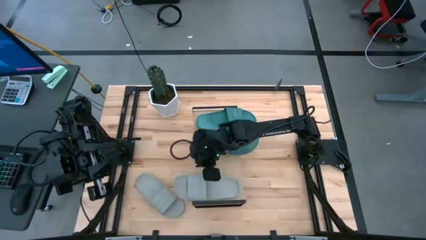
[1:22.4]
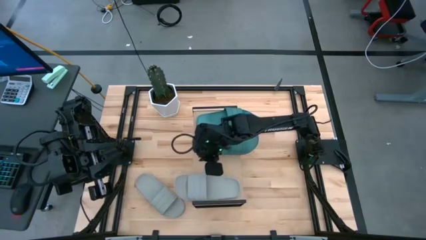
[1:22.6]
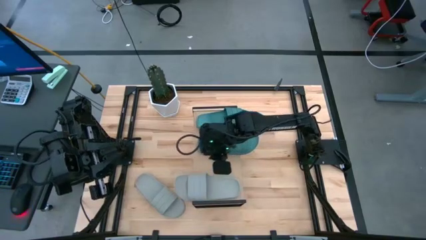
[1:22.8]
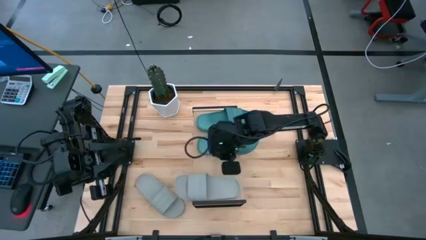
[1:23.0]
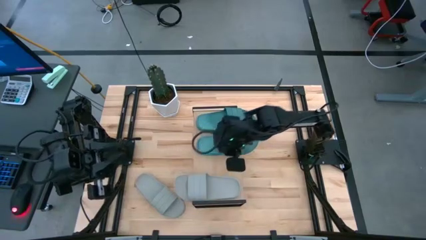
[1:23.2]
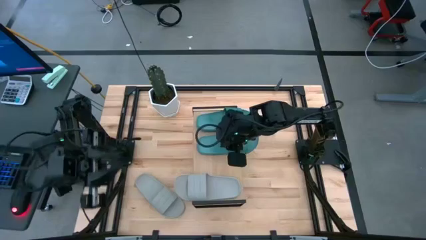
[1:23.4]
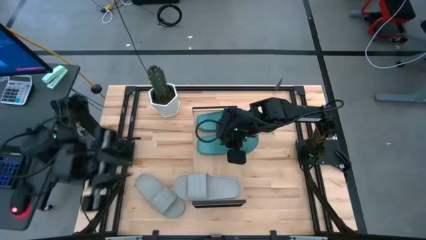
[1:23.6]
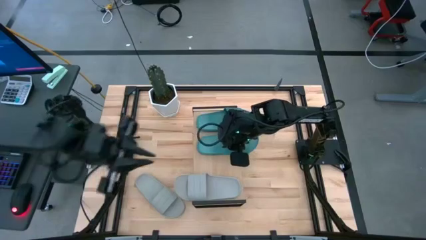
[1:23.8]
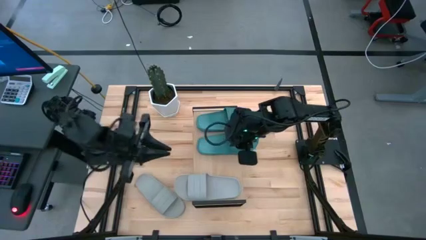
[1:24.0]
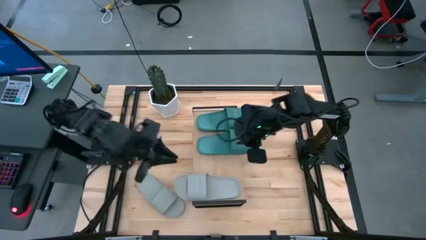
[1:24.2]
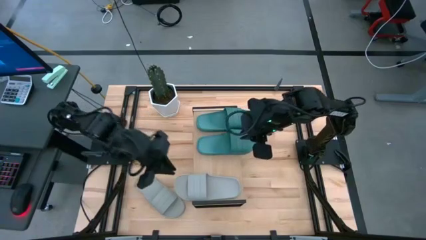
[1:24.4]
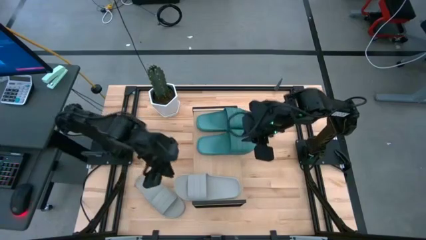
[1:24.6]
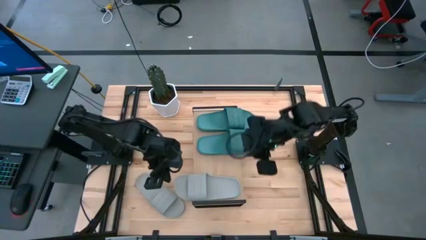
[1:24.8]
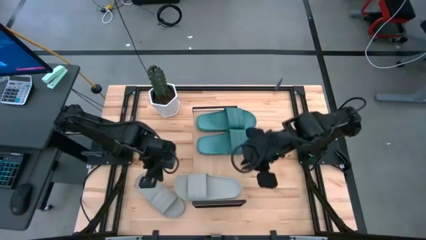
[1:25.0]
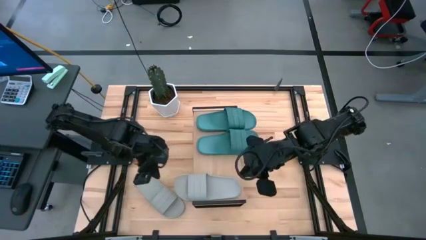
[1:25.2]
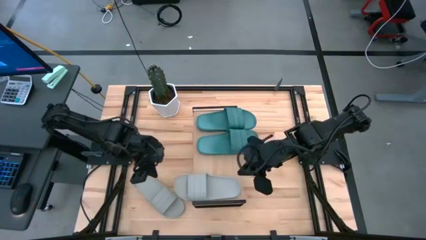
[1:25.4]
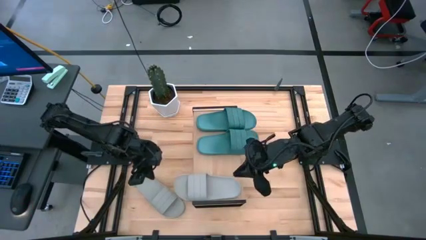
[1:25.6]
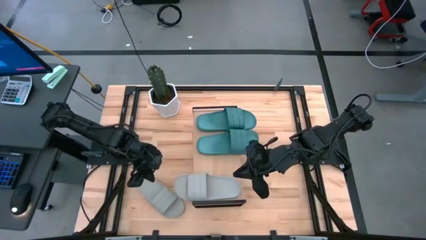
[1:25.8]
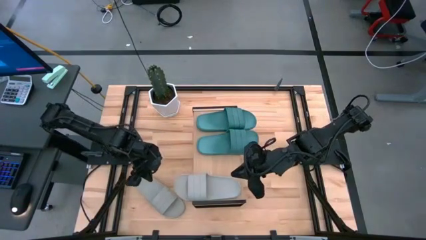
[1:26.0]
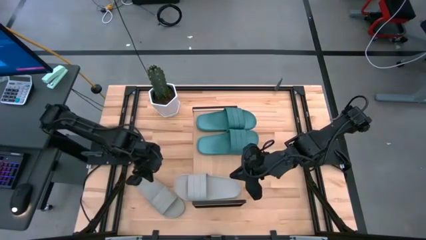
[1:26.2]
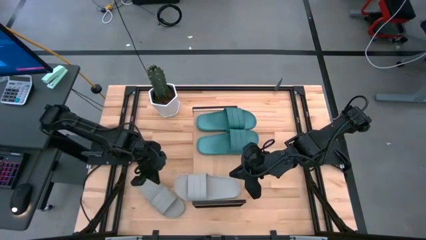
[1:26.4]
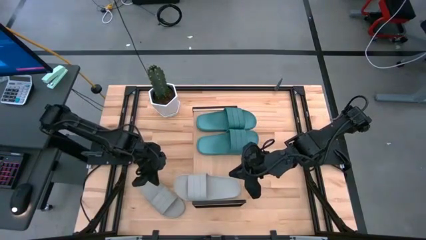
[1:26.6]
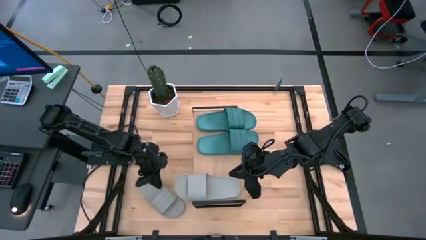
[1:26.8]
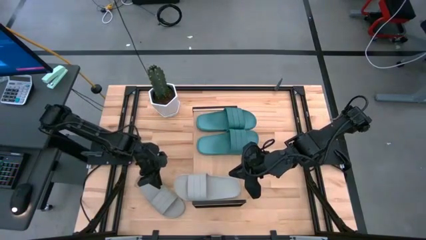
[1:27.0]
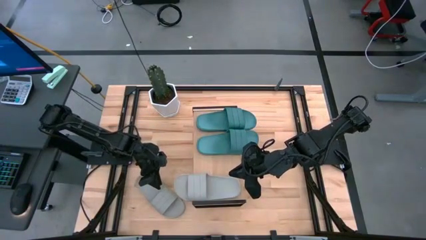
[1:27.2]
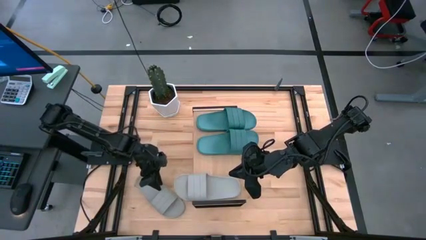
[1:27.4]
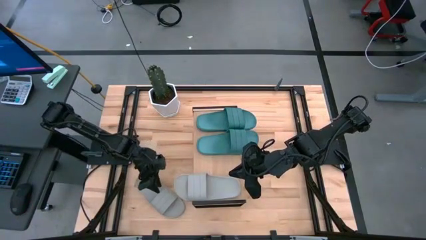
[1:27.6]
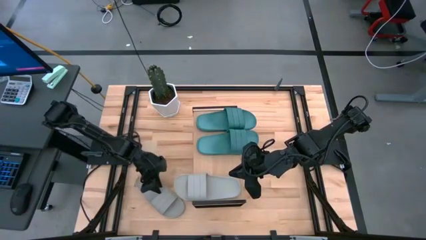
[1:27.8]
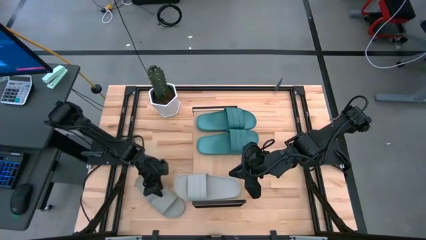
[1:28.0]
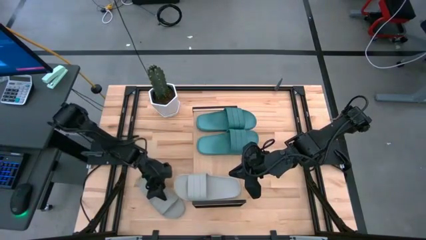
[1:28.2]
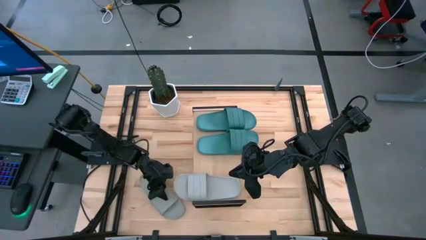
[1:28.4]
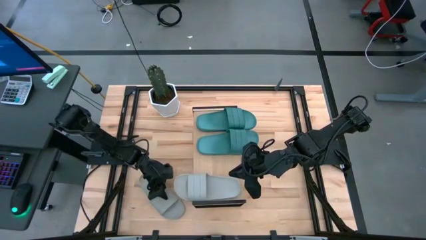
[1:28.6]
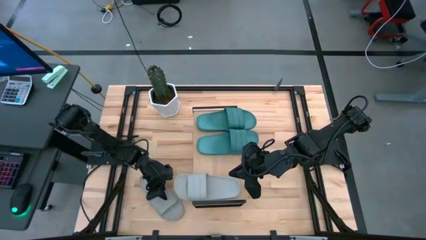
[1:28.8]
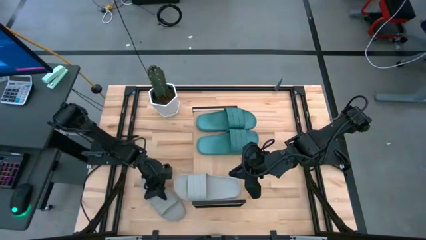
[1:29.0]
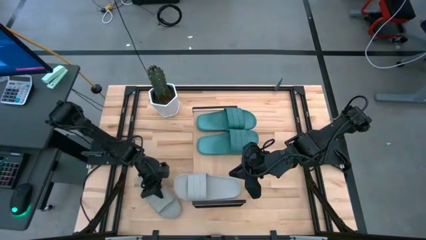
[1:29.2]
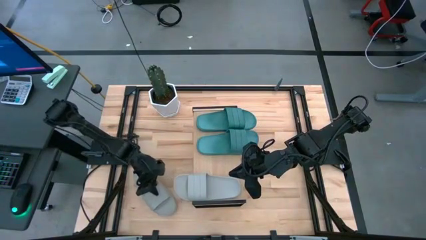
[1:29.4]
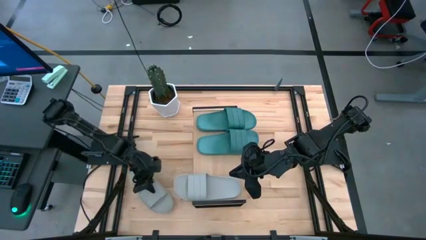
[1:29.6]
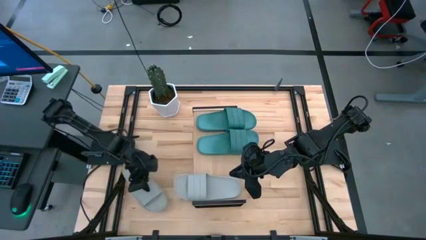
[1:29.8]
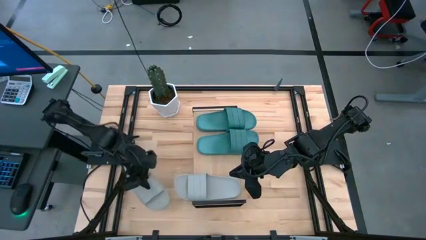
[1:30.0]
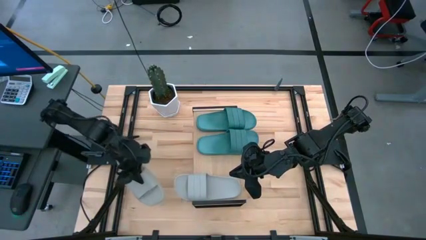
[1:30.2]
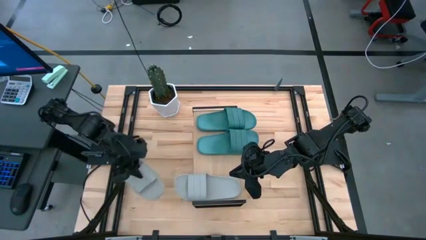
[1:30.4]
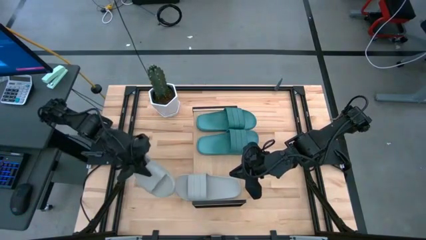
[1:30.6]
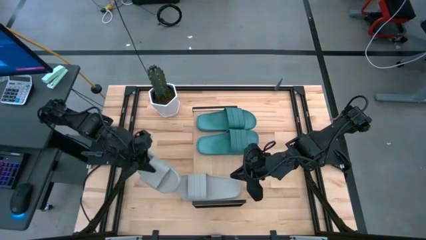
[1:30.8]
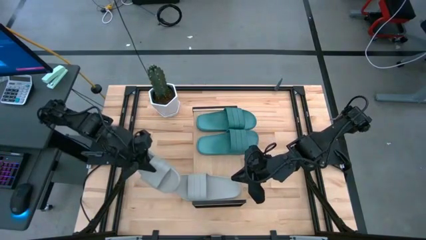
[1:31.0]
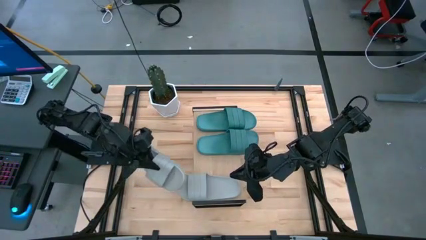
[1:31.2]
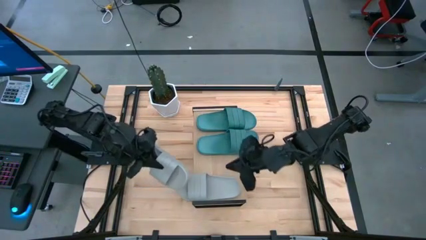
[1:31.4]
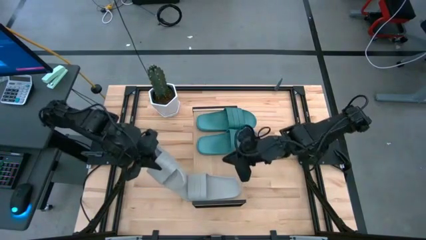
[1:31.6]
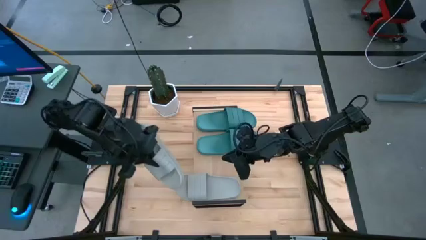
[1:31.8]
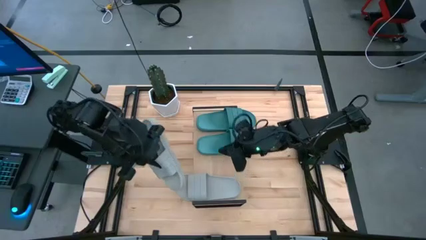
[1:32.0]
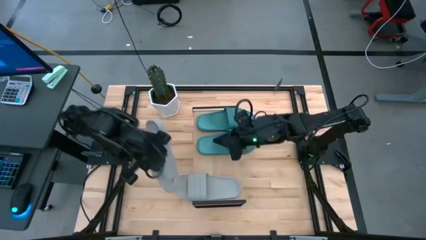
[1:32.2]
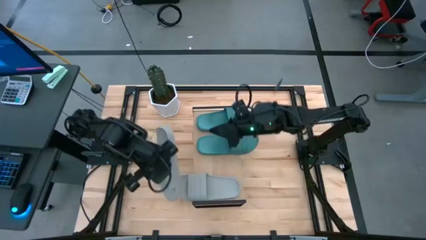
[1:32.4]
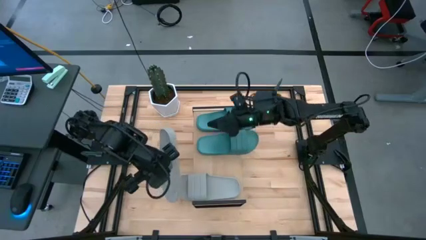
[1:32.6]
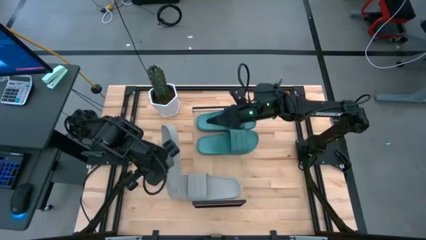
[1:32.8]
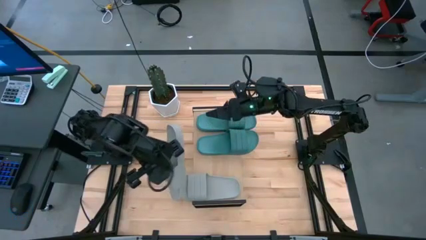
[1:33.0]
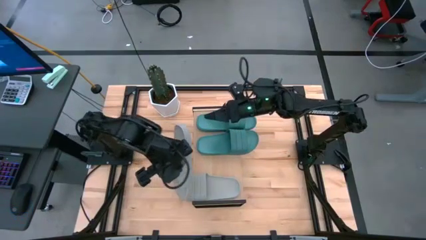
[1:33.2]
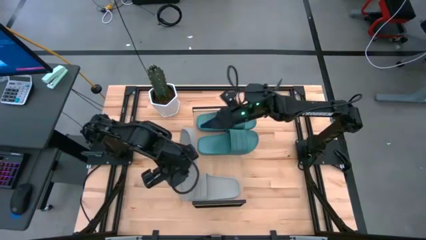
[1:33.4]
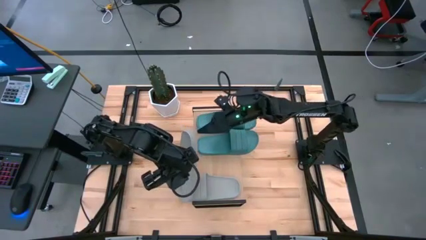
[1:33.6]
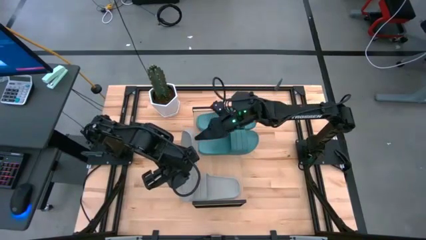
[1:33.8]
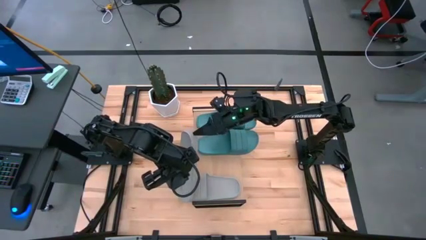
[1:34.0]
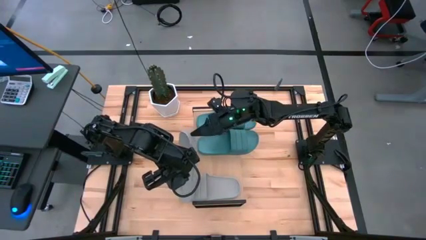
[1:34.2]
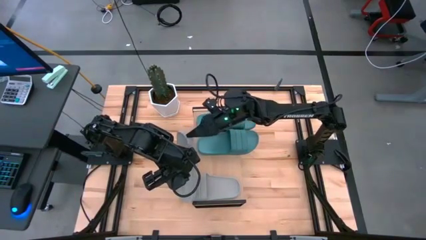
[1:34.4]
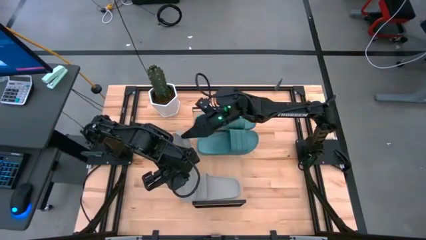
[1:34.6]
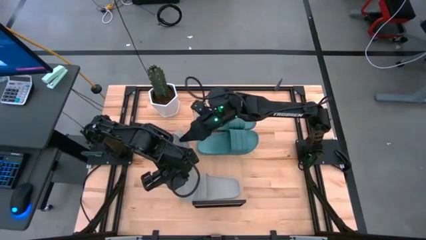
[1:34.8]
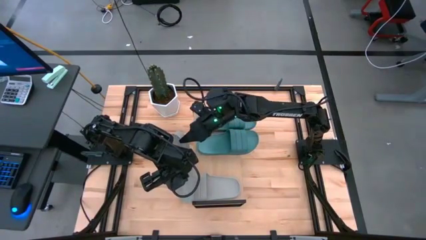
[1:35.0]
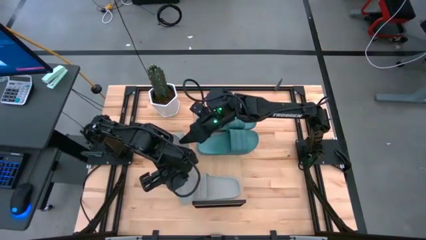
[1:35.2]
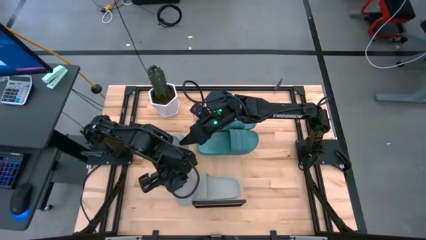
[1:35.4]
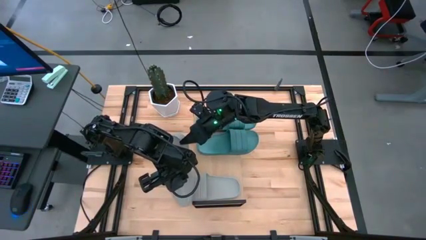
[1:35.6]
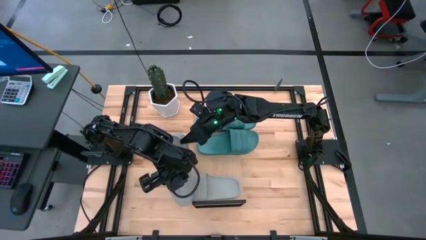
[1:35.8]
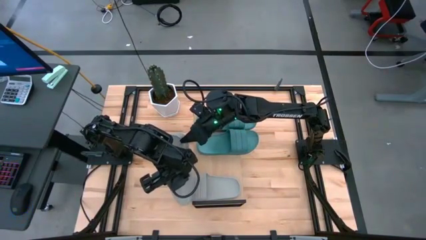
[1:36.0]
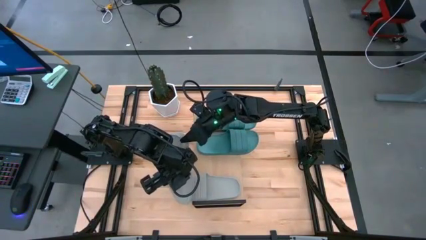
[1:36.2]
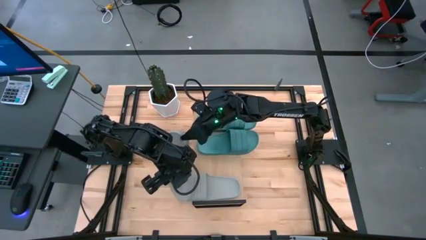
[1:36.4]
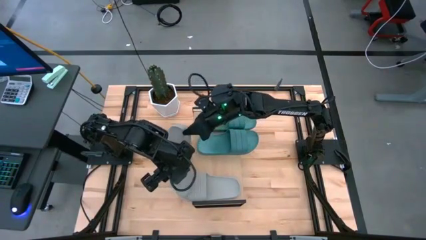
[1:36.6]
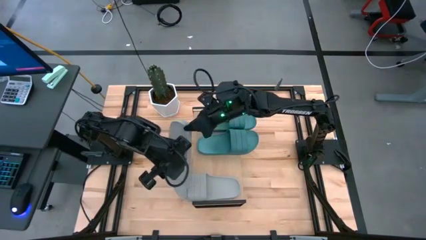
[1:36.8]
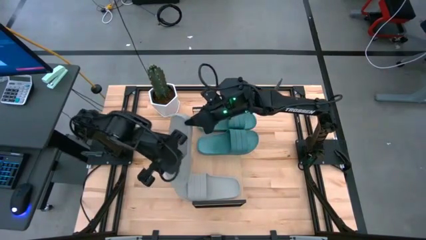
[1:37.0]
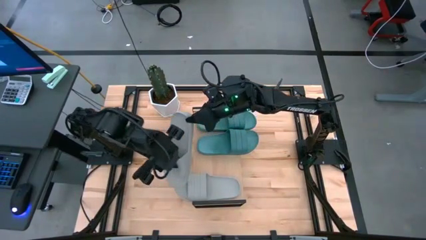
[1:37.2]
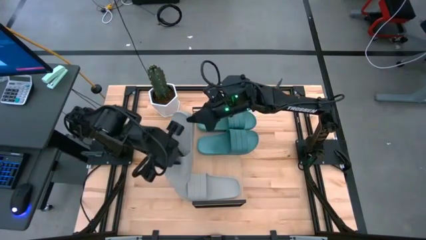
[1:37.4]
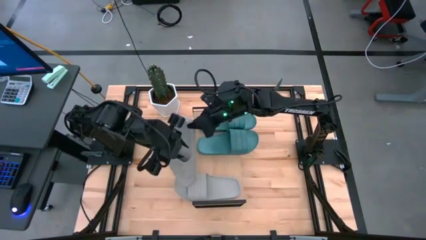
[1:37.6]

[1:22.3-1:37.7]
Task: Pick and place slides into the shelf
Put the gray slide on the shelf
